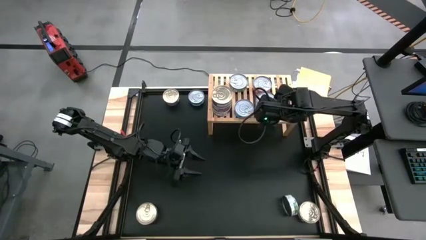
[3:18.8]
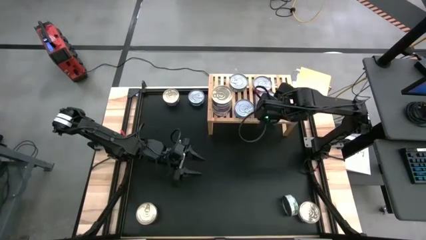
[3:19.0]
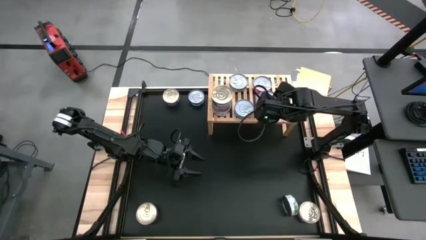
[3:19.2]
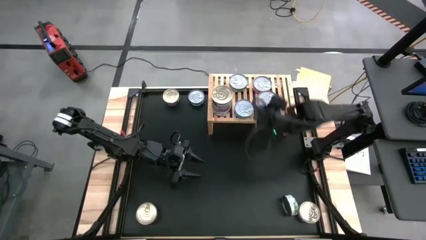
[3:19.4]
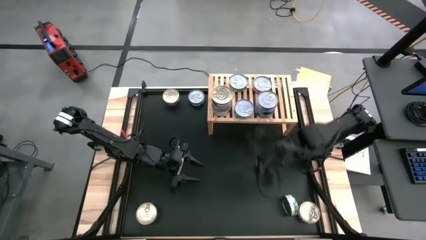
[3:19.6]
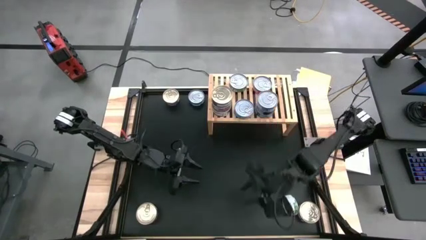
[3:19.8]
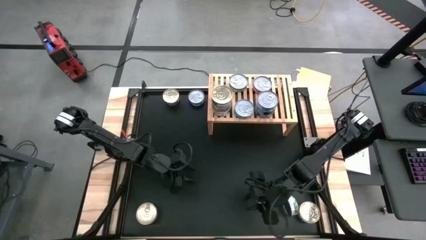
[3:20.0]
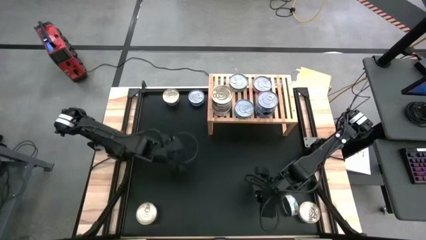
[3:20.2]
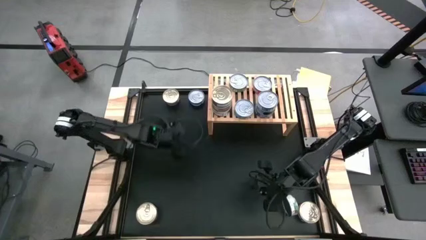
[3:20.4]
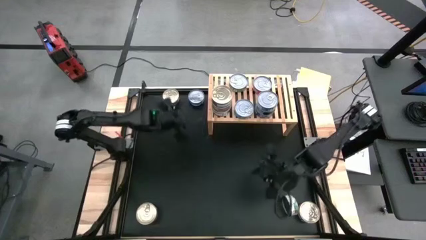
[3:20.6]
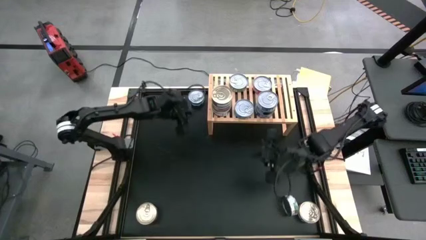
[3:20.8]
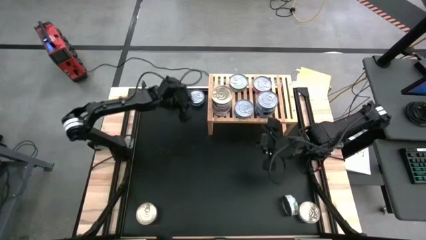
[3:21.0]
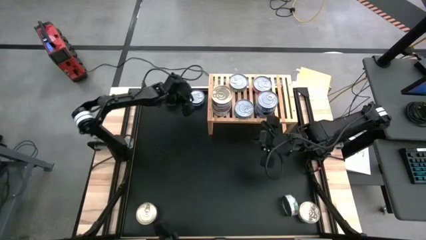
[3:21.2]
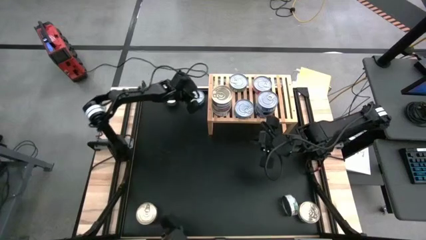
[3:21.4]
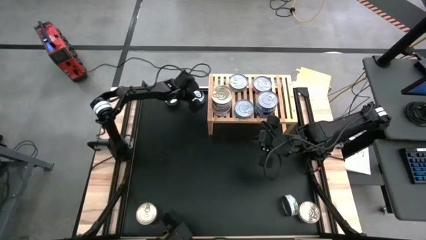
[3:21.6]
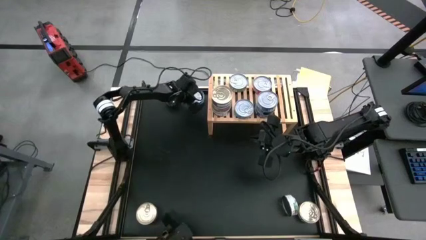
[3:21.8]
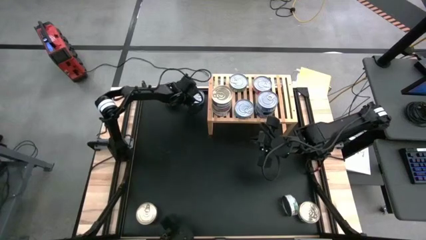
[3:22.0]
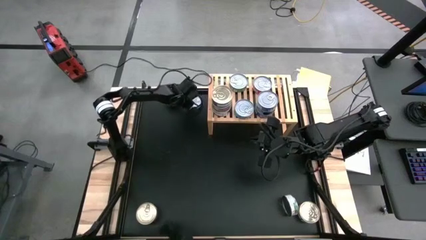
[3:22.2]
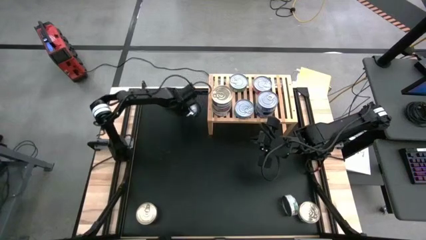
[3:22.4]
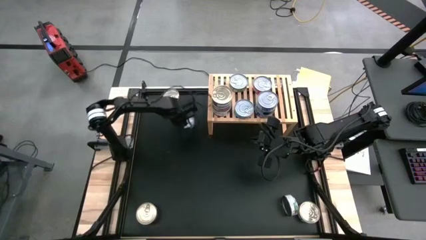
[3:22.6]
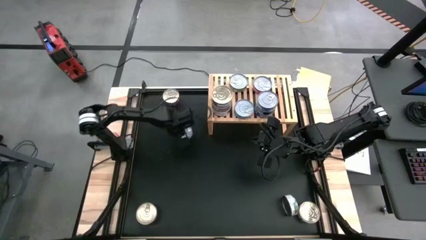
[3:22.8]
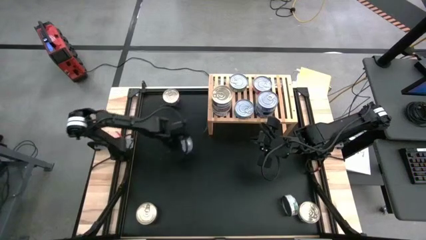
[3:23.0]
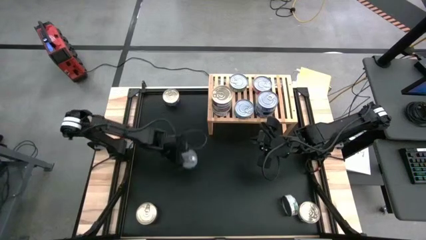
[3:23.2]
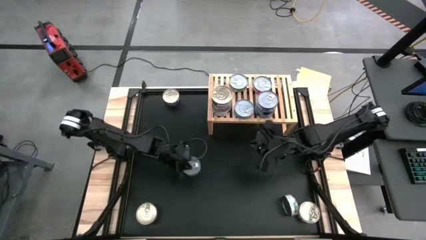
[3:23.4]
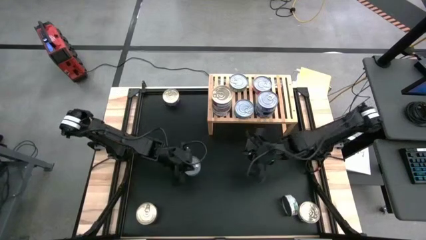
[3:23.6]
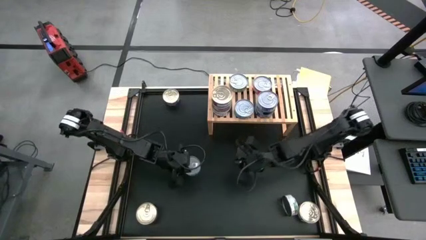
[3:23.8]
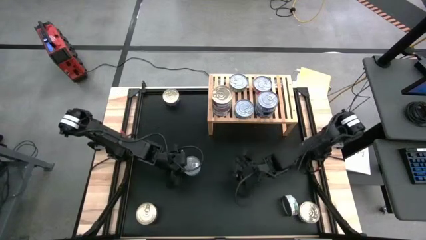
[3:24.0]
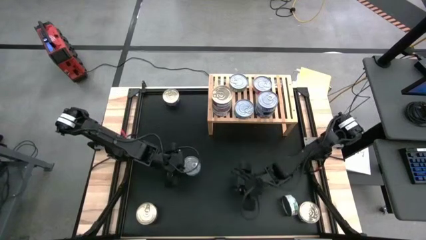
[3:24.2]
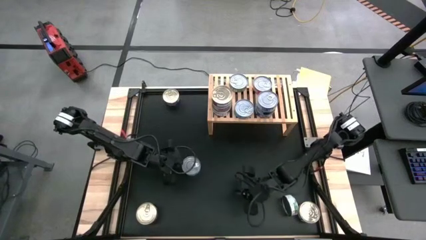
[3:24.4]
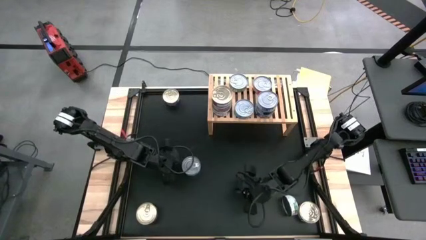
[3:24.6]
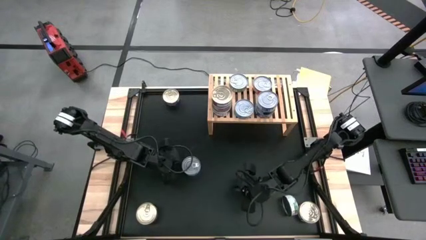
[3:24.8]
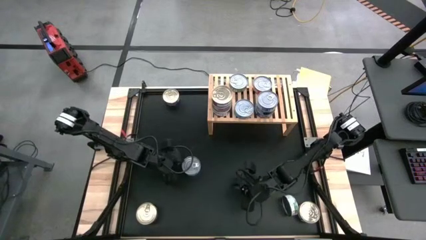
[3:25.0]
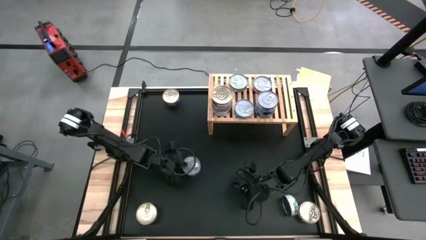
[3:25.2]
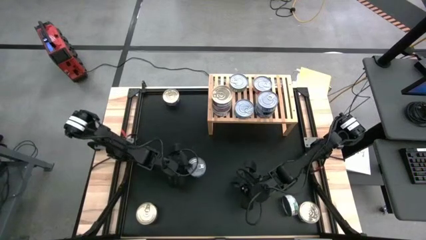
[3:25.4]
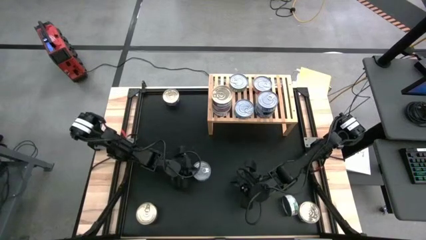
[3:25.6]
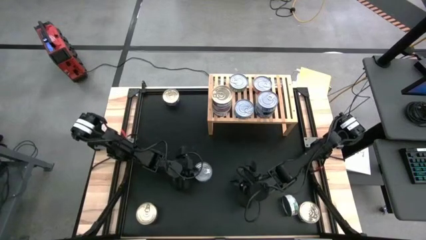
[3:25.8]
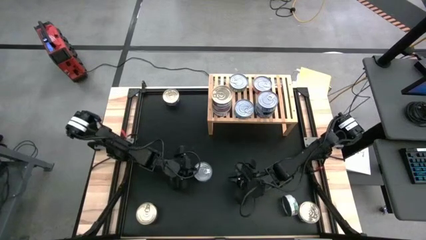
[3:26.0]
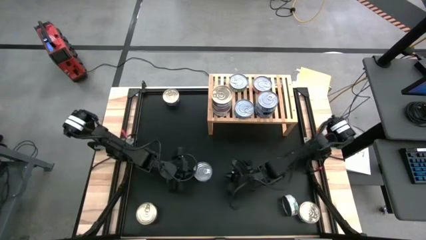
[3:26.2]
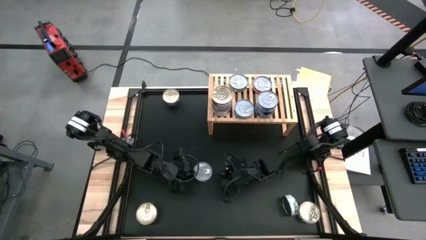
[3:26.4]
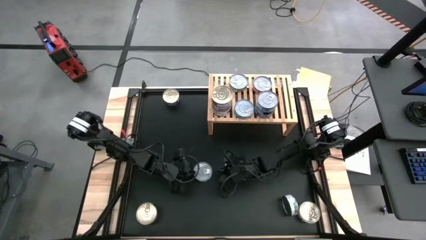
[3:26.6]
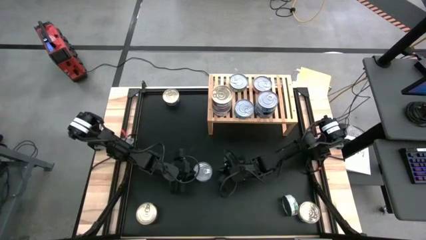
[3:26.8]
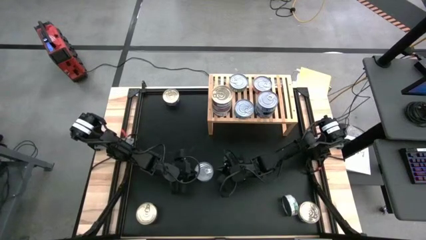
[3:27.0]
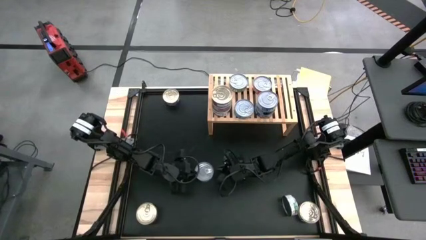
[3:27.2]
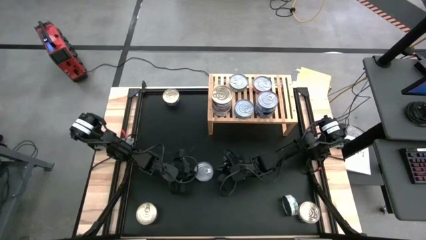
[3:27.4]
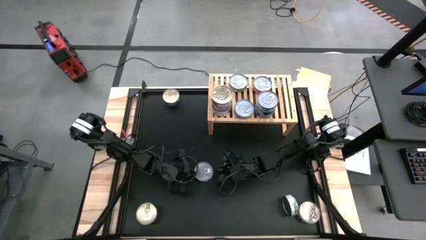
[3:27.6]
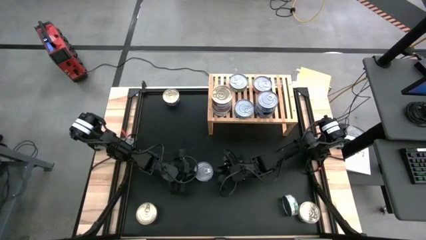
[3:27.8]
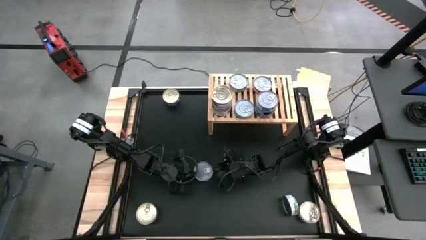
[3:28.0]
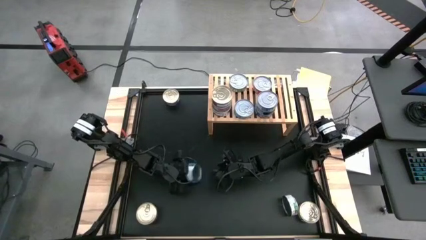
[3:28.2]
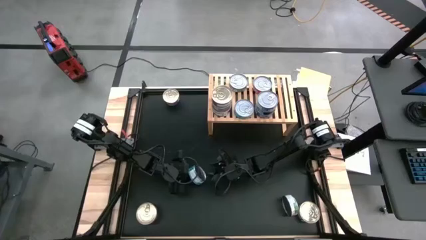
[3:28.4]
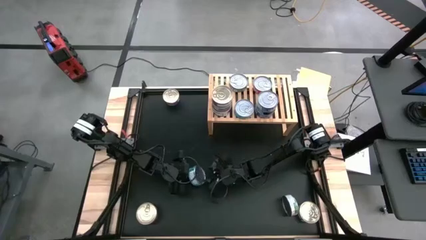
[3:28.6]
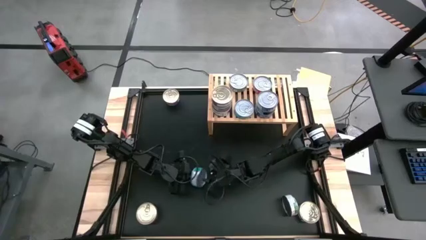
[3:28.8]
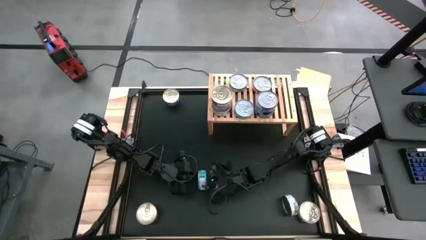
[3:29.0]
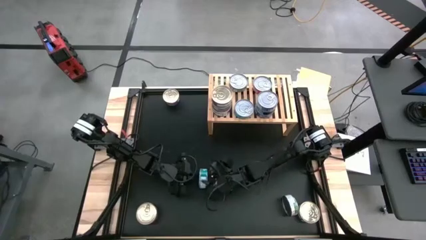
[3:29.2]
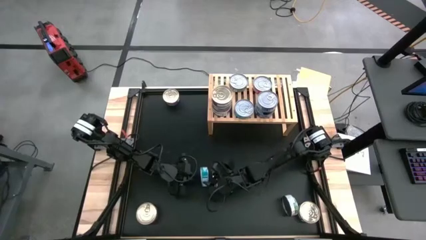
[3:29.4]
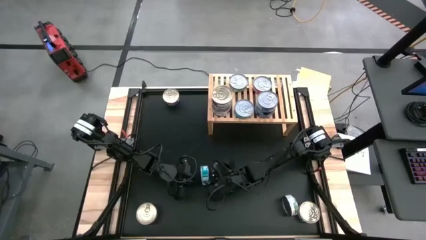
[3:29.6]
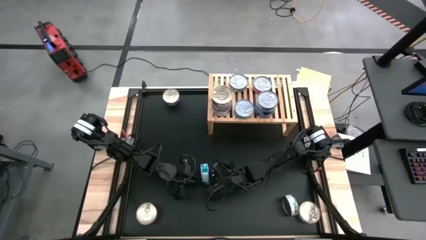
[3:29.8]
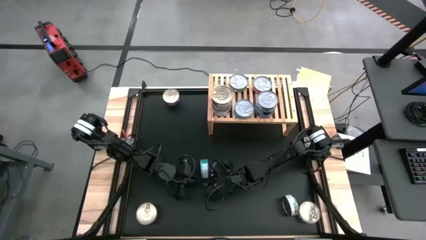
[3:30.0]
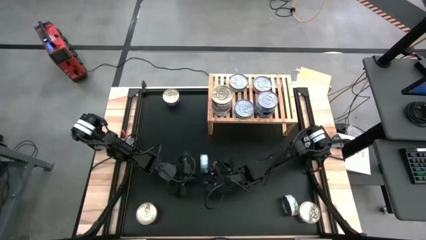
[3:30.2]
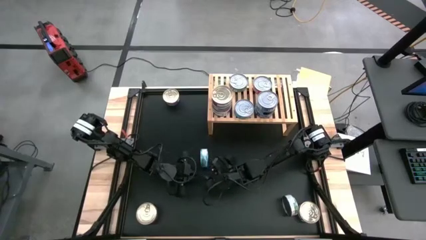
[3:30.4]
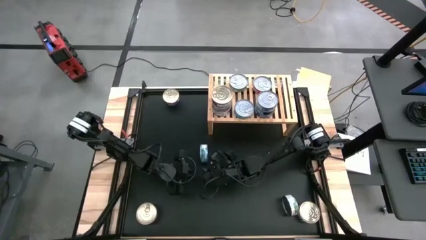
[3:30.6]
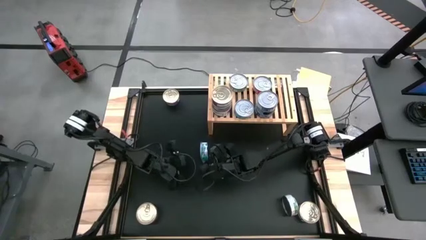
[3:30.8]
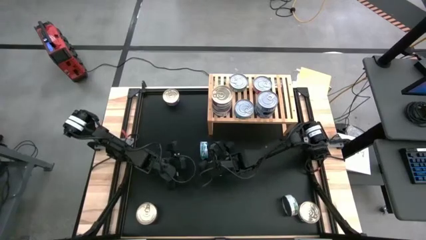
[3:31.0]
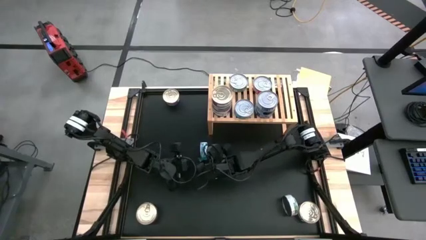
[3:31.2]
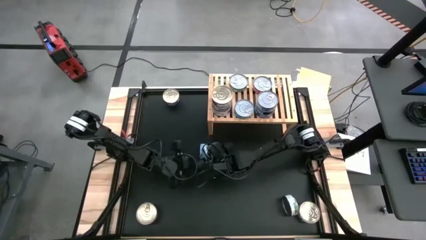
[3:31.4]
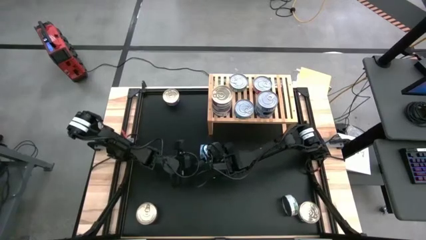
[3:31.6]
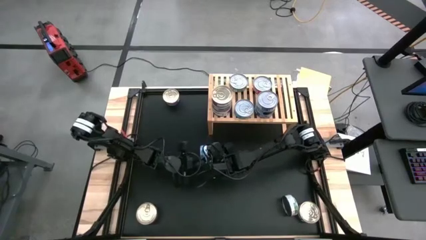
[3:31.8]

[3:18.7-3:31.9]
Task: Stack canned seafood by type on shelf
Put the green blue tuna can on the shelf
